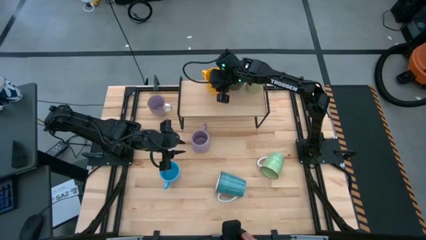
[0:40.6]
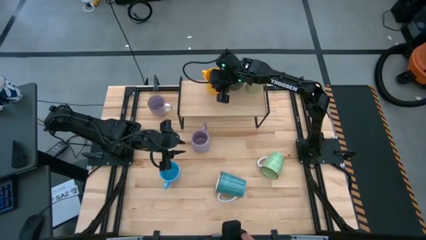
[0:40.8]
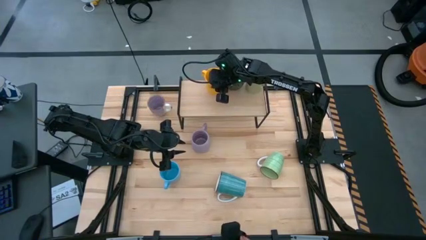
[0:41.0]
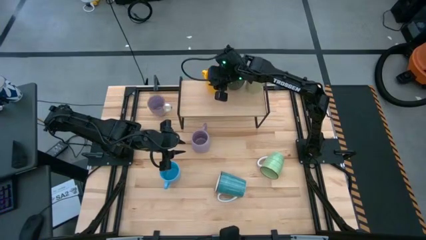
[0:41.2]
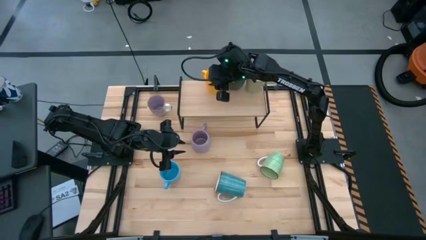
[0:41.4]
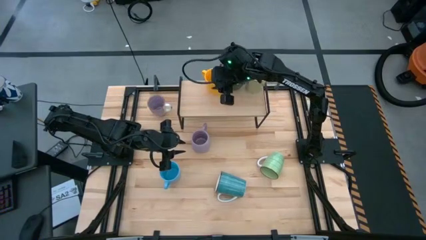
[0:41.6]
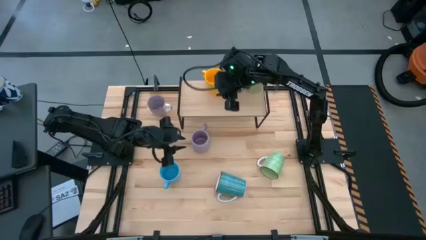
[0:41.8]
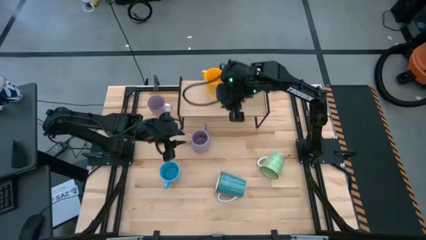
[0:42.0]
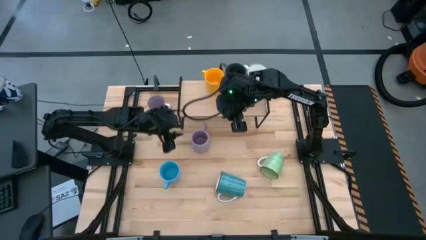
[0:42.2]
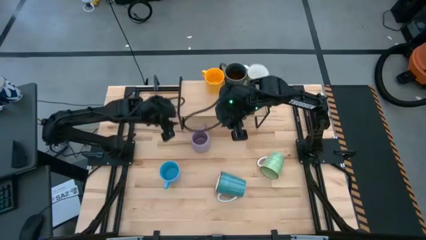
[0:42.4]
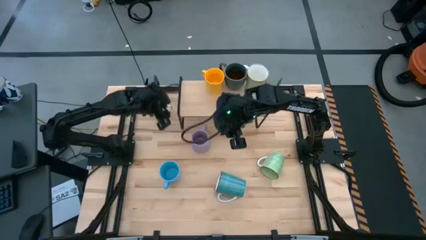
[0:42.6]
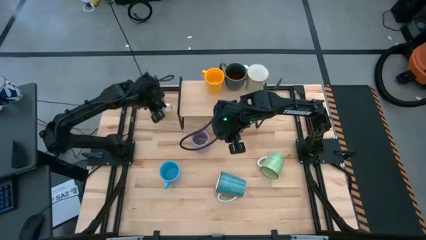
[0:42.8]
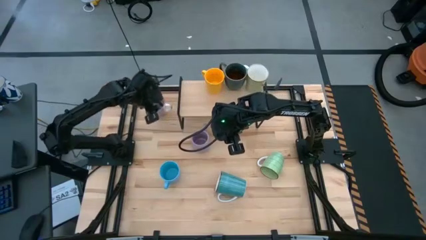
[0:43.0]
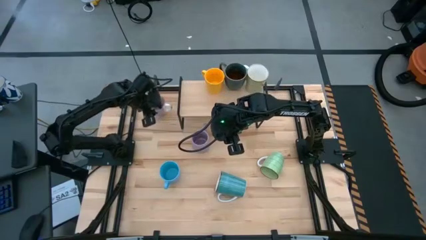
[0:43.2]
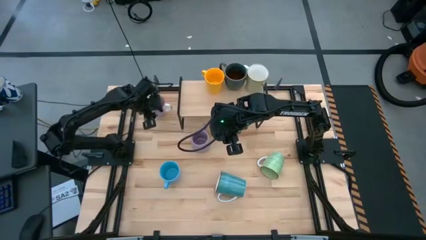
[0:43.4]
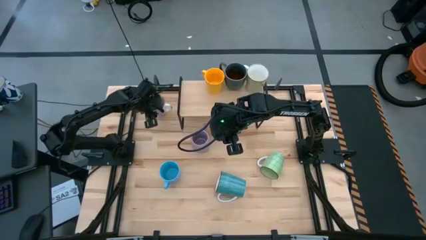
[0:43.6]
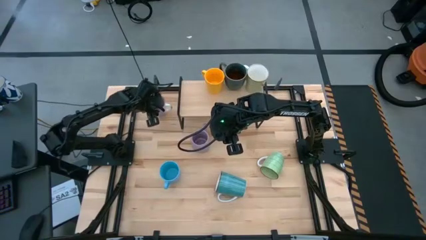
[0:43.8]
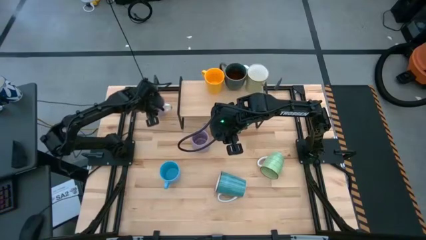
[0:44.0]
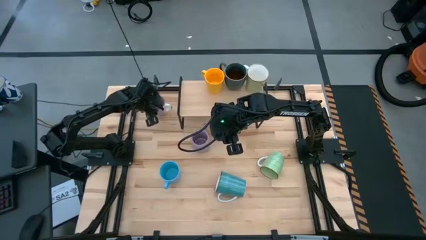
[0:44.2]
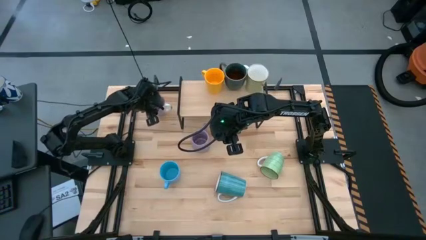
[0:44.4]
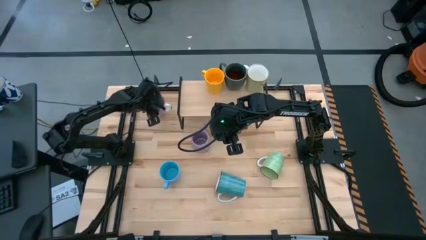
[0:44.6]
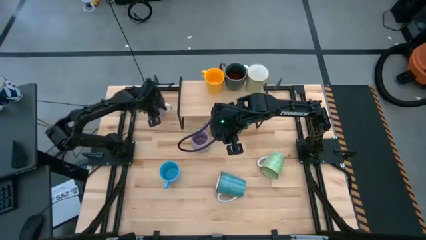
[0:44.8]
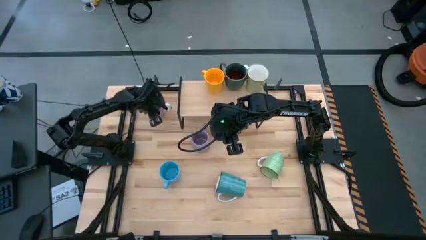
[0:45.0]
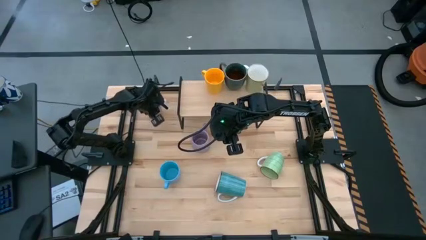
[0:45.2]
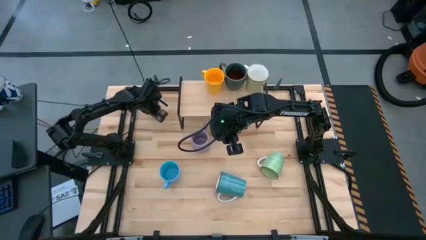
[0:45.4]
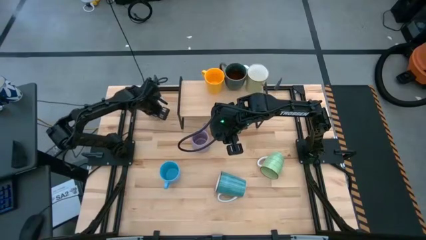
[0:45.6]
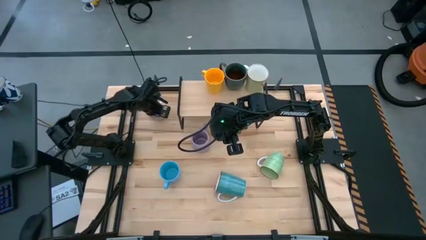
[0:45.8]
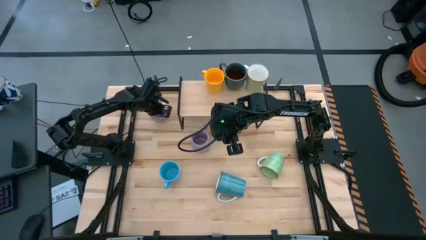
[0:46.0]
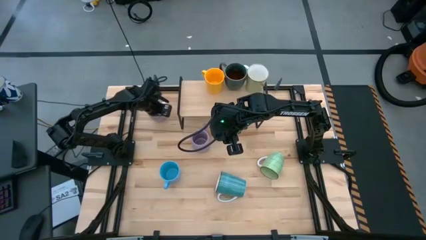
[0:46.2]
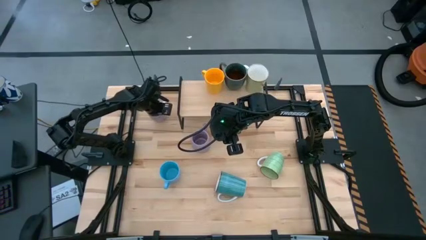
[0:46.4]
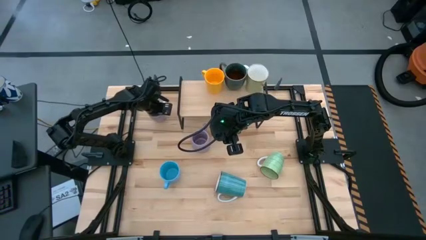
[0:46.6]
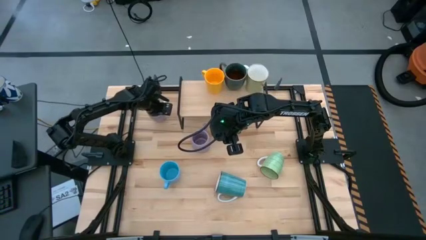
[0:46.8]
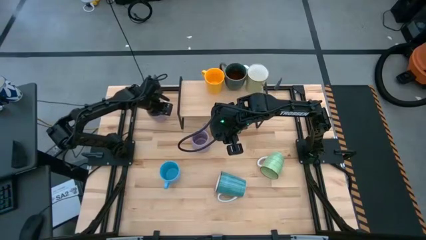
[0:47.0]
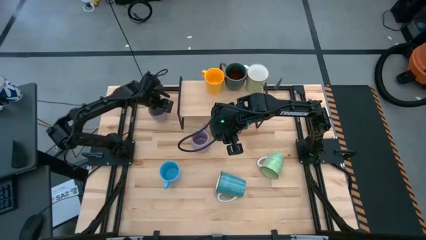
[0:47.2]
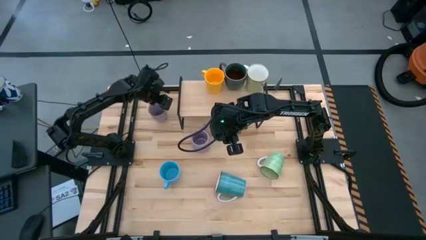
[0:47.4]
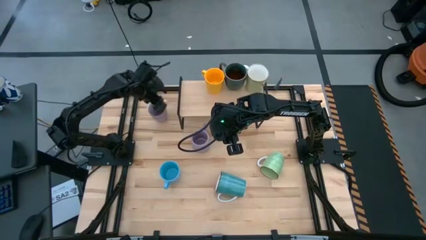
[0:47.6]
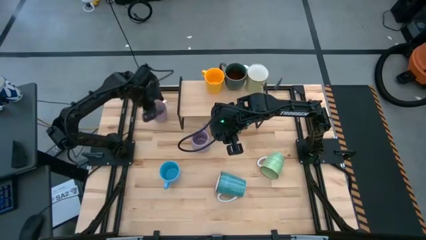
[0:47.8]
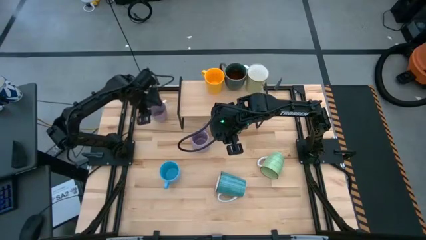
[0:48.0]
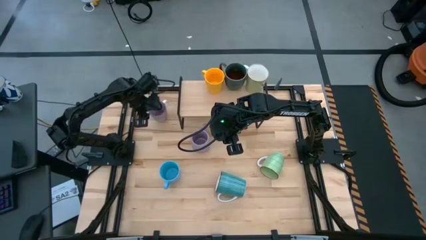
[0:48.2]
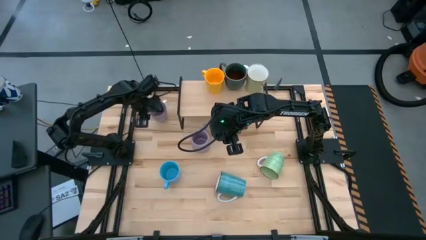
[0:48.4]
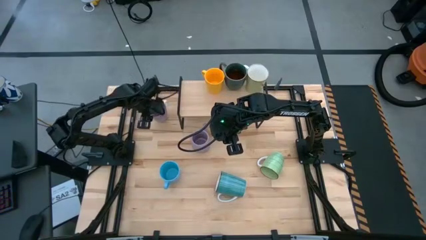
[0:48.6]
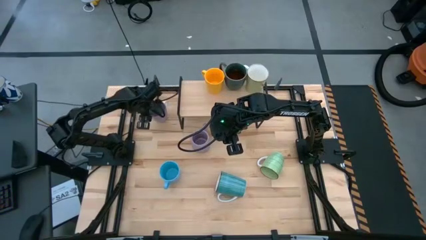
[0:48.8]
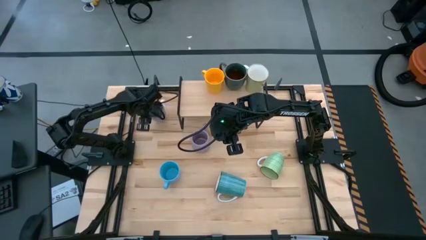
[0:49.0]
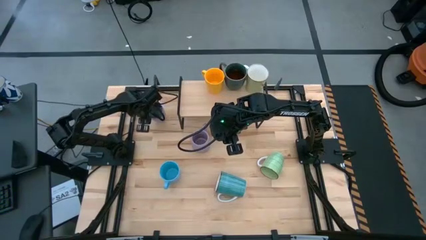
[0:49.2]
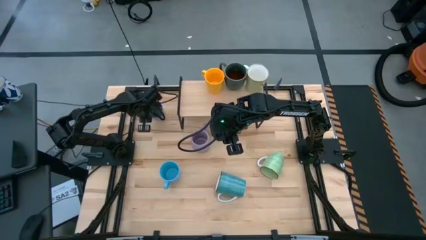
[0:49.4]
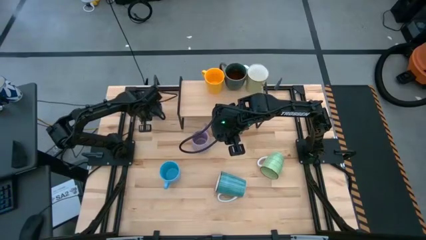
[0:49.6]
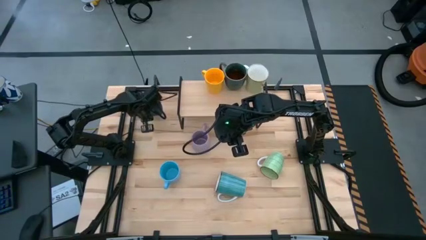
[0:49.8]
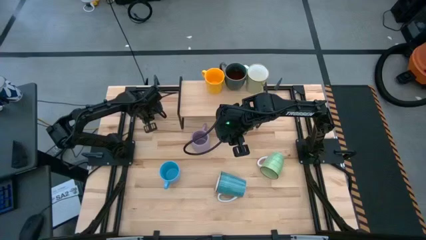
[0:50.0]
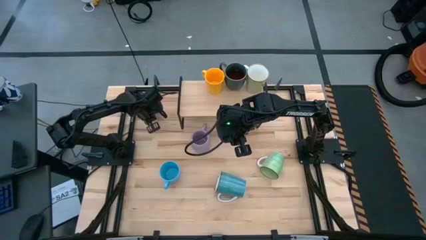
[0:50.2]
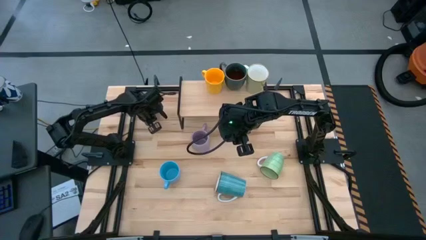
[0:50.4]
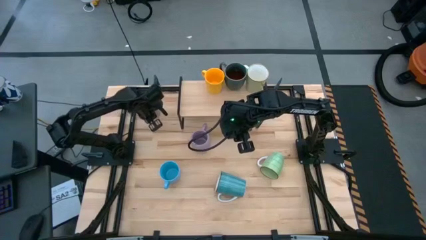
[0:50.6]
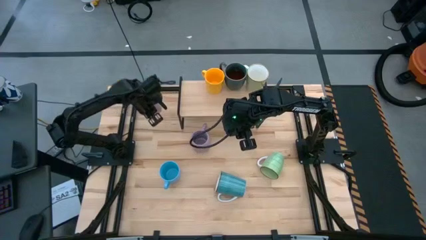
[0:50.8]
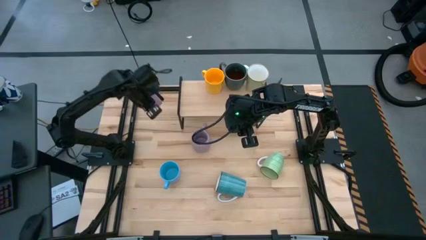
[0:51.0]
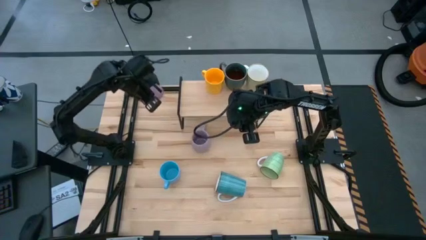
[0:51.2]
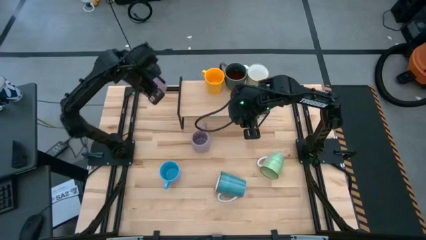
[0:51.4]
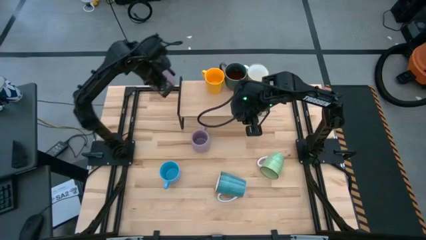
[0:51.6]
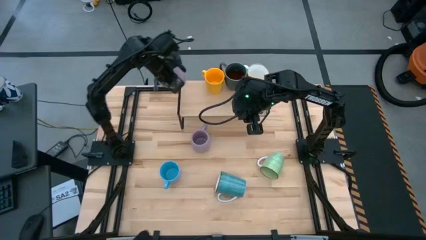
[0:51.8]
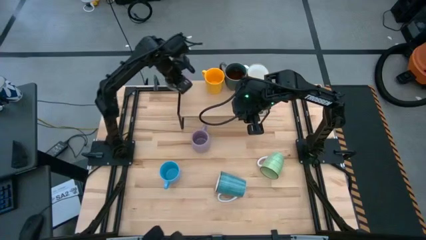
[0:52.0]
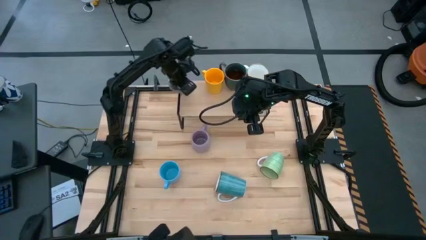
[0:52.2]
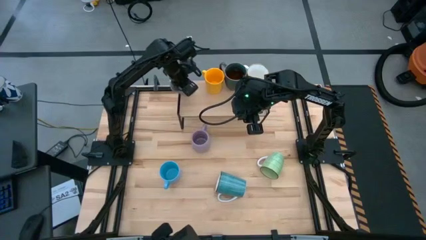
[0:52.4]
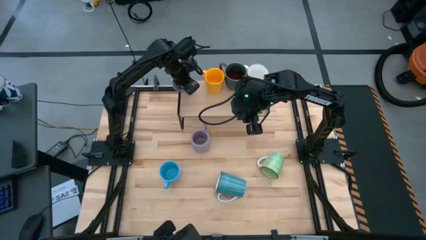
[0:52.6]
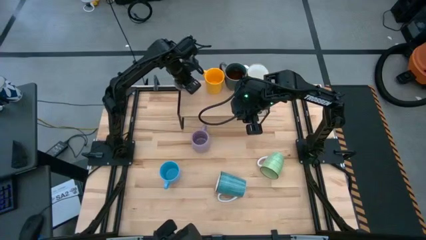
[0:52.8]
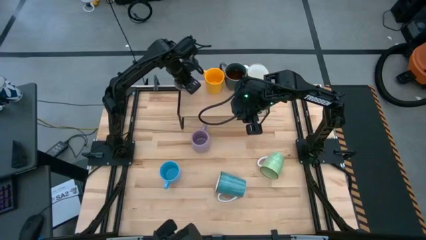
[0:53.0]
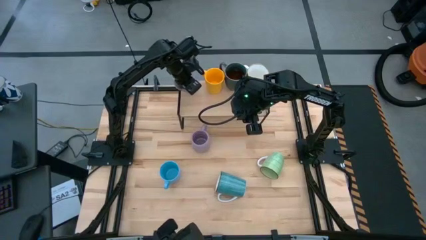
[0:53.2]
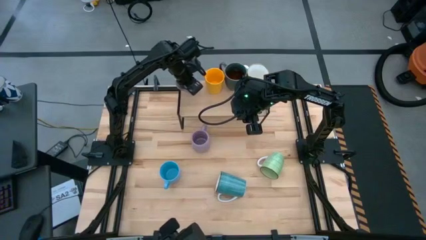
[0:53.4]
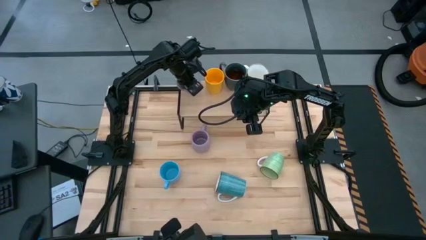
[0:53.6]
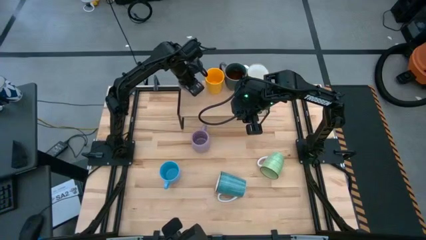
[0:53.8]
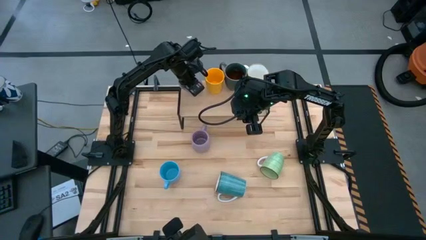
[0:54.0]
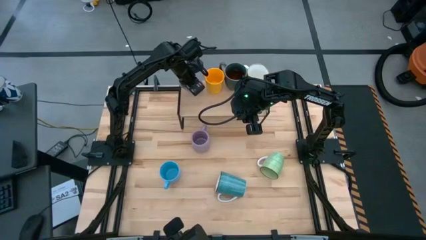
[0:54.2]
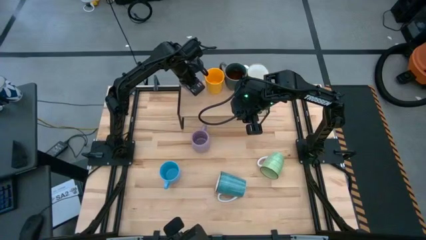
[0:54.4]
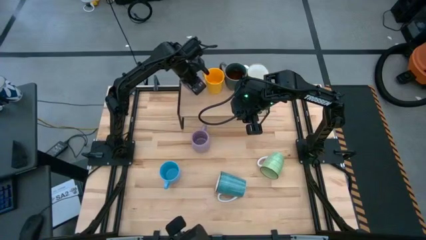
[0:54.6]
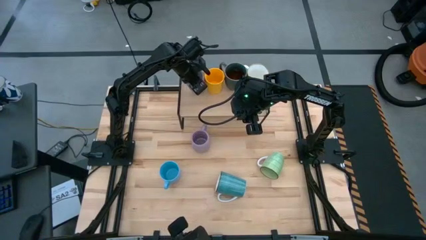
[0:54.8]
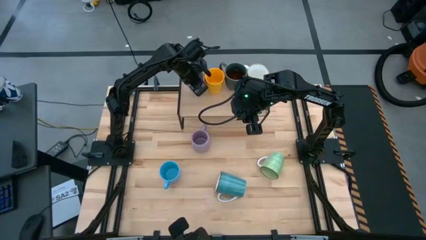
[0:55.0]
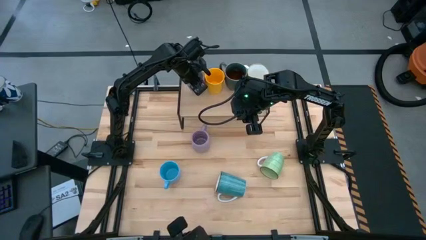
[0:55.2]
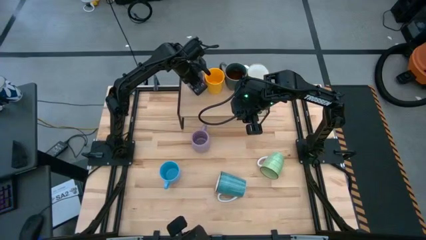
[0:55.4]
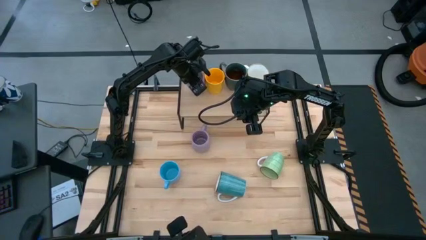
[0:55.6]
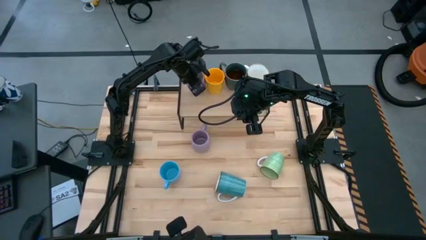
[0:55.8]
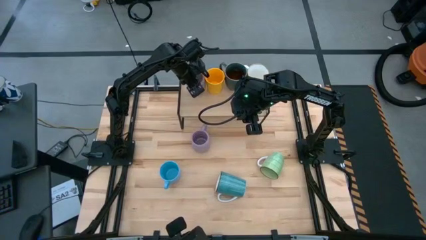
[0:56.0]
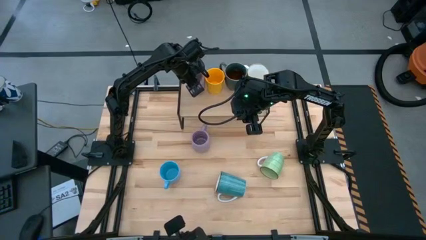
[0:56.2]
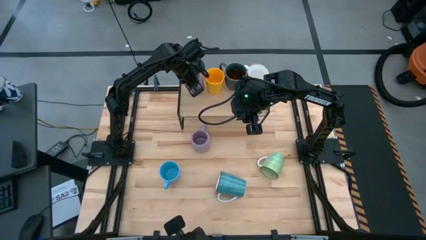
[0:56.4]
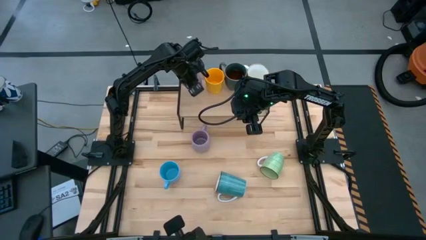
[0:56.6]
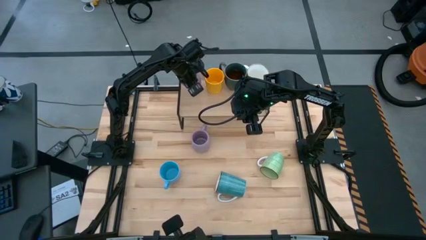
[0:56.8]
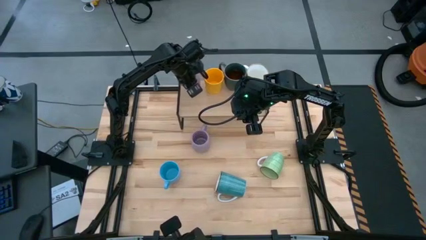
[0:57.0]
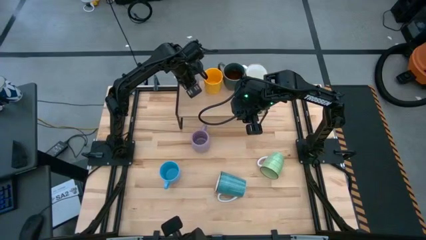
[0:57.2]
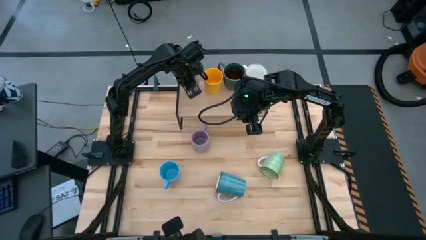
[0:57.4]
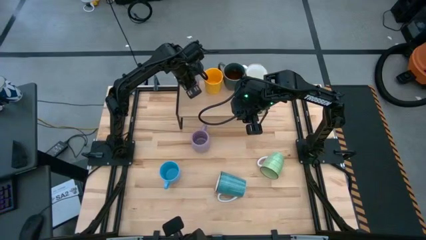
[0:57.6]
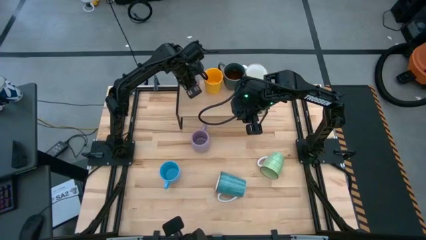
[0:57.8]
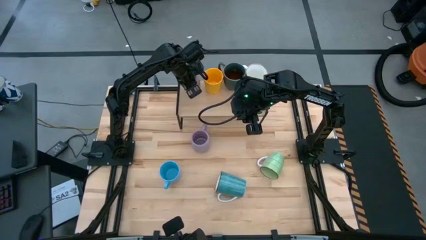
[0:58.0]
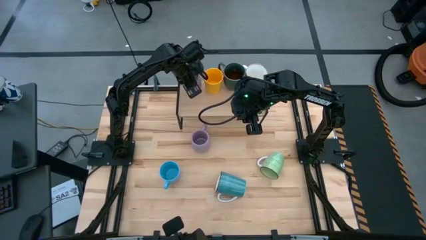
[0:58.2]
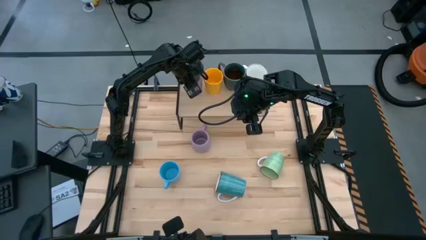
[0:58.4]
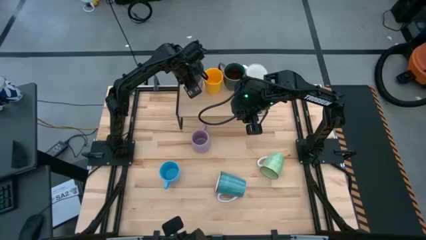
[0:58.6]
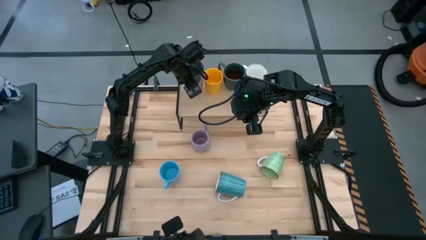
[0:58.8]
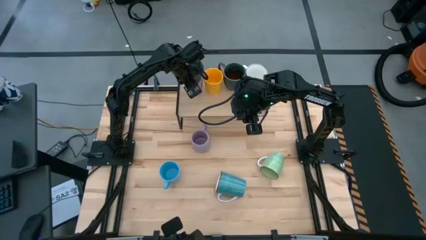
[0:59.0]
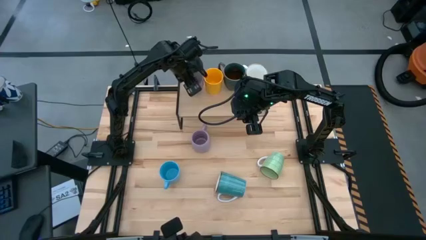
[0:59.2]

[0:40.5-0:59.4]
Task: Place coffee mugs
Put the violet mug on the shelf
